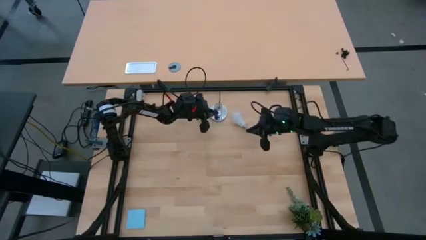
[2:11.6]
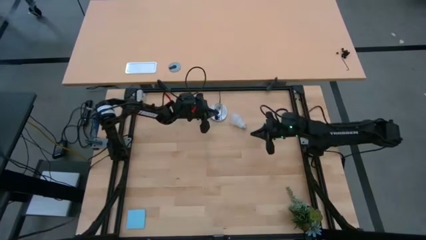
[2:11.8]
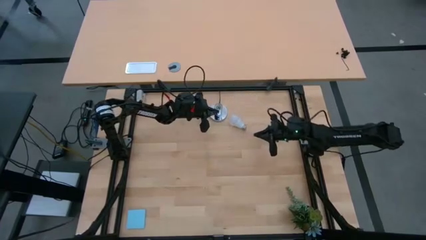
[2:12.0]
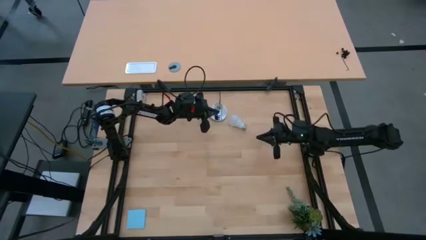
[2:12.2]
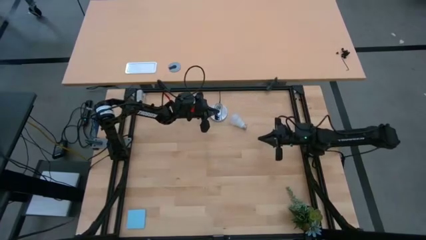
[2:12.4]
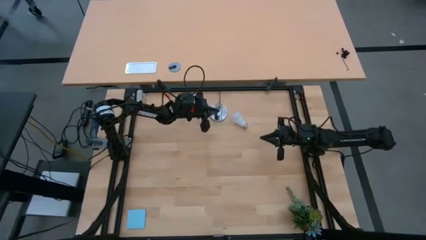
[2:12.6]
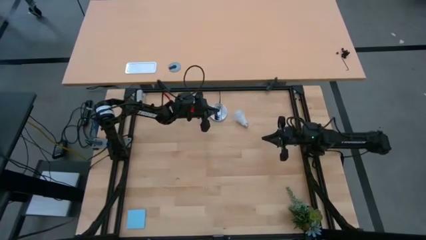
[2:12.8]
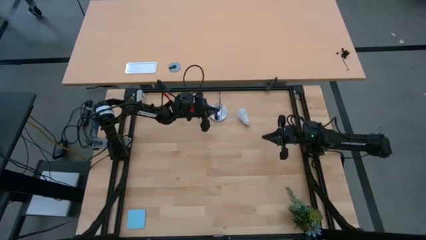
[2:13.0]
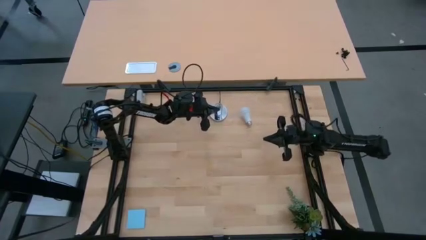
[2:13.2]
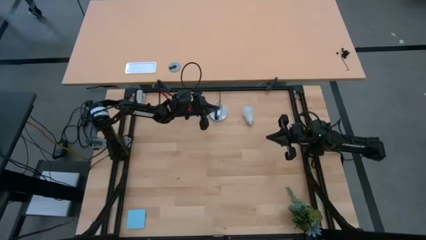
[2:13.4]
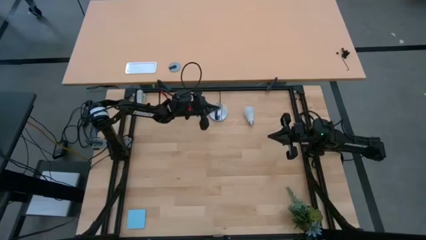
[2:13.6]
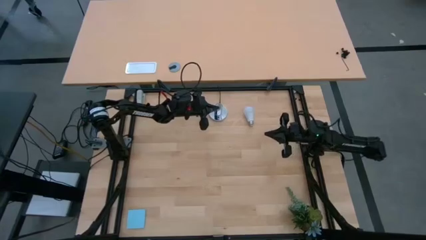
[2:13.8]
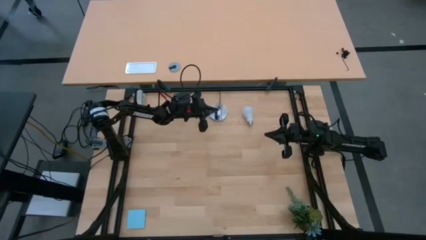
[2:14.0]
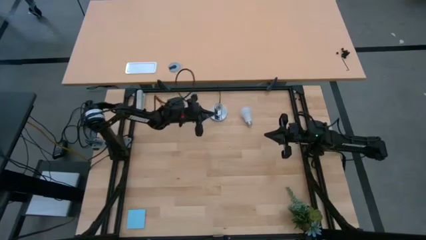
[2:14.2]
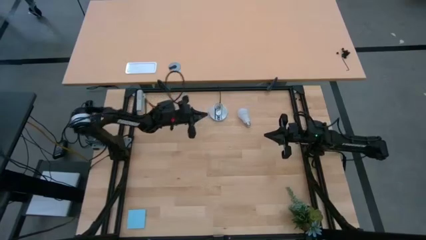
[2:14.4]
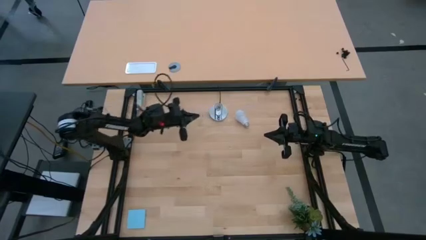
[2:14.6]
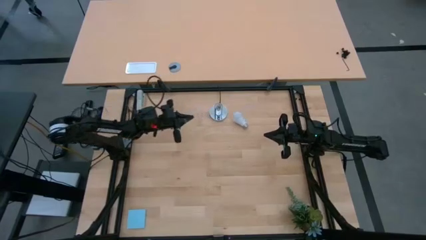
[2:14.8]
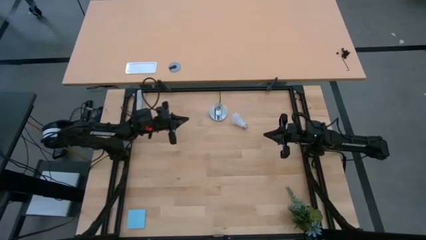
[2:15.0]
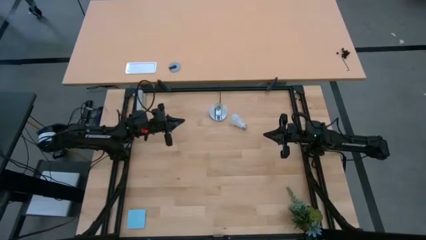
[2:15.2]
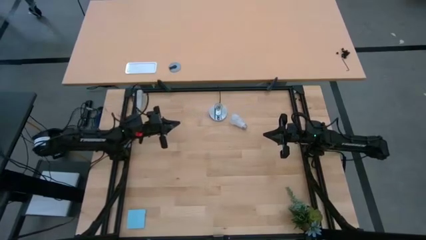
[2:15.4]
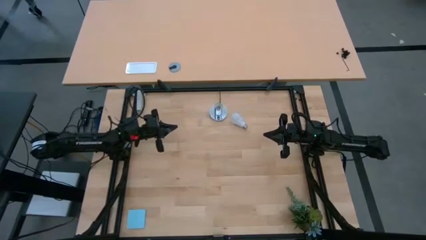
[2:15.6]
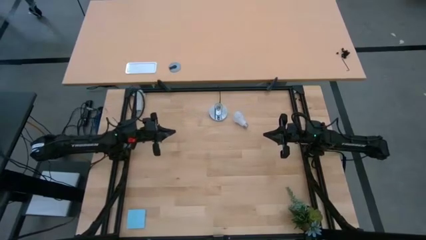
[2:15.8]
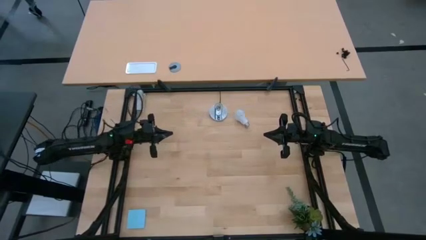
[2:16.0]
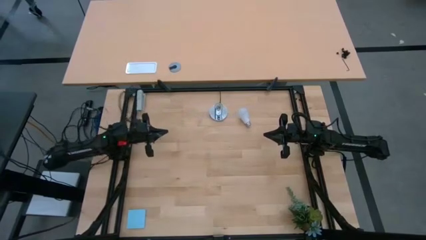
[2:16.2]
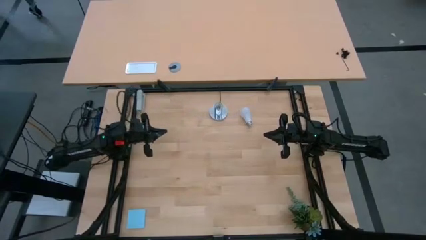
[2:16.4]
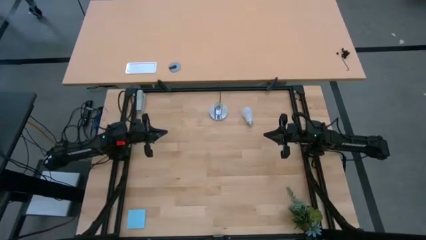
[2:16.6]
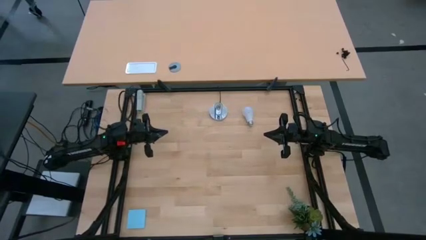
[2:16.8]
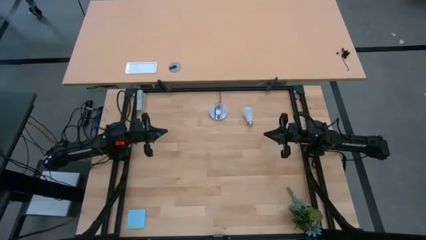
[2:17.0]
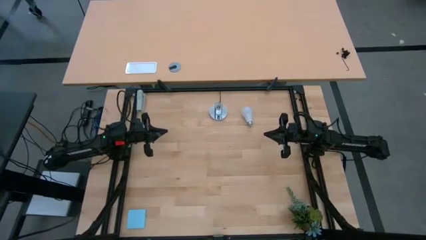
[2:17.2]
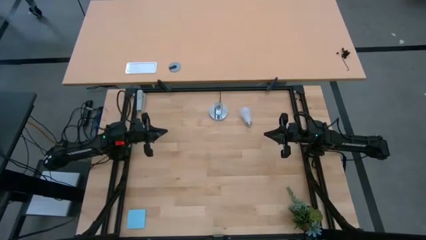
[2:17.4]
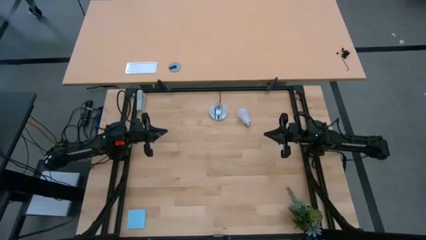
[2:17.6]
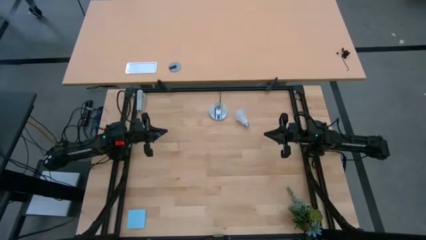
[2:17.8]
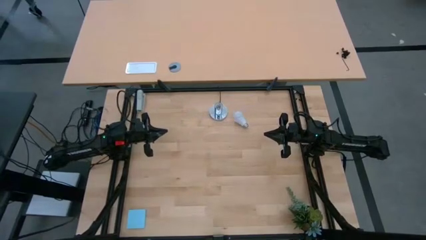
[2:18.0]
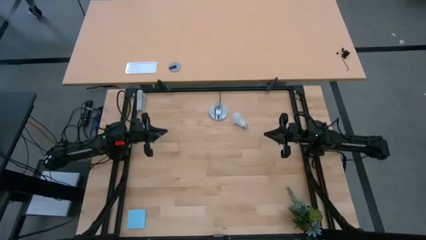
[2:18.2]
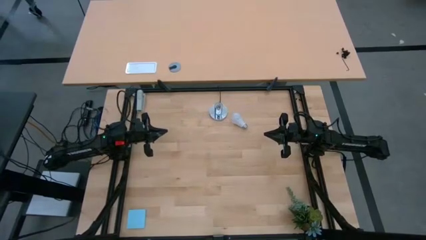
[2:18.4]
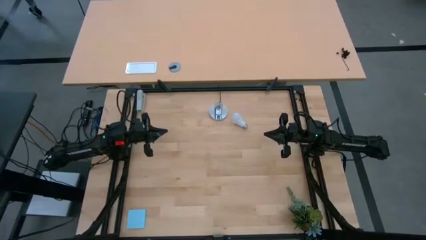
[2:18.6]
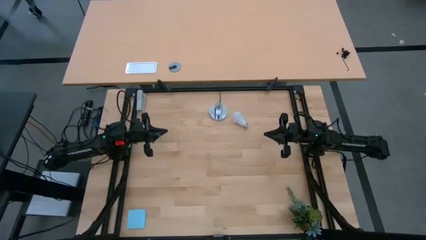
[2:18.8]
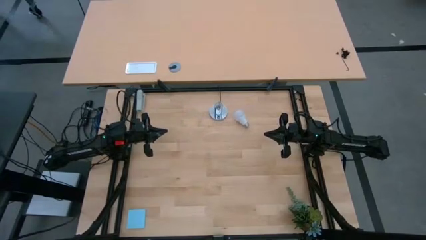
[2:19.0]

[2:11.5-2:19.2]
Task: Screw lightbulb
Return to Home Position

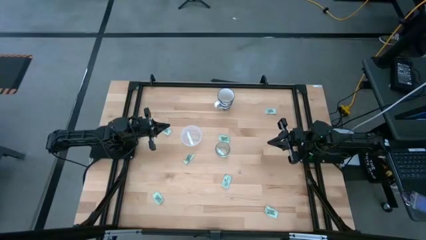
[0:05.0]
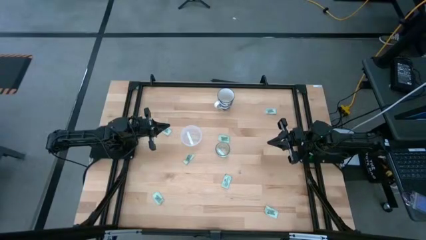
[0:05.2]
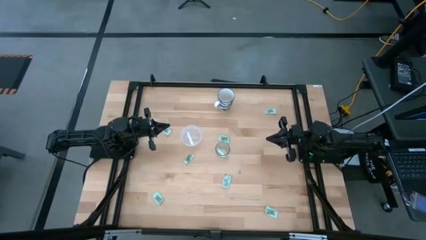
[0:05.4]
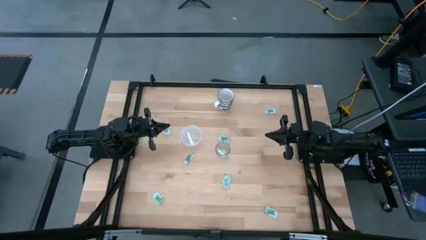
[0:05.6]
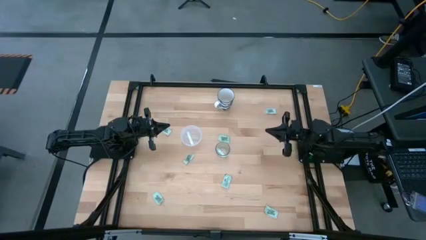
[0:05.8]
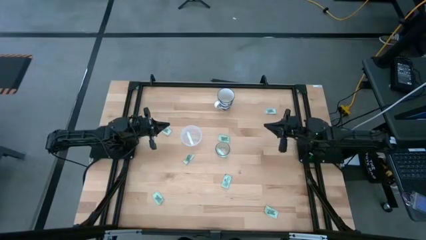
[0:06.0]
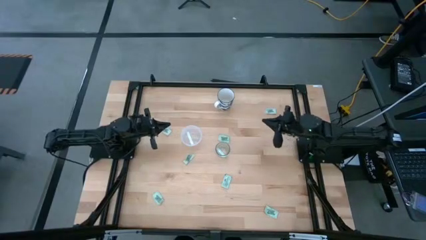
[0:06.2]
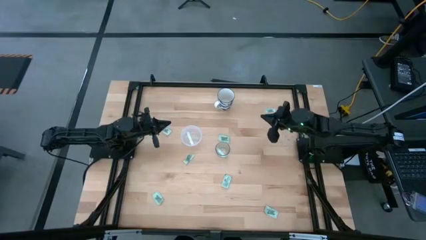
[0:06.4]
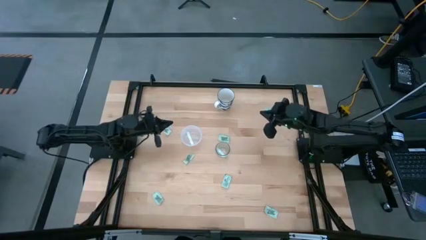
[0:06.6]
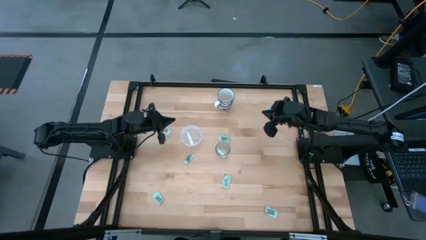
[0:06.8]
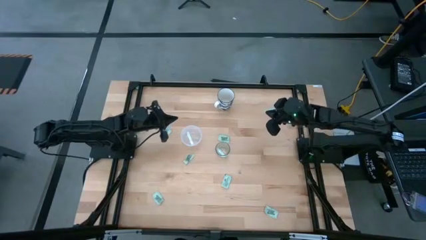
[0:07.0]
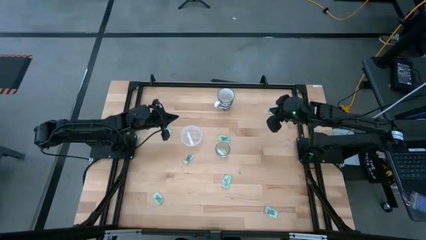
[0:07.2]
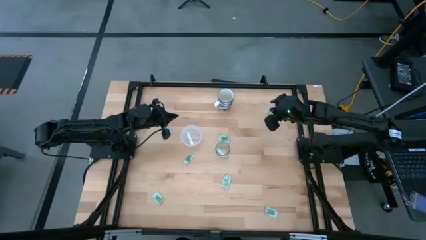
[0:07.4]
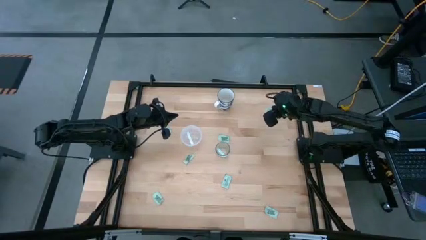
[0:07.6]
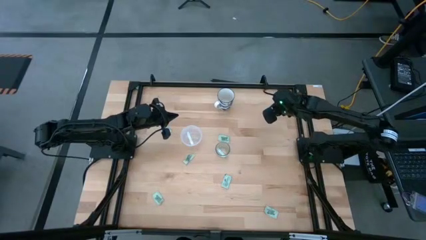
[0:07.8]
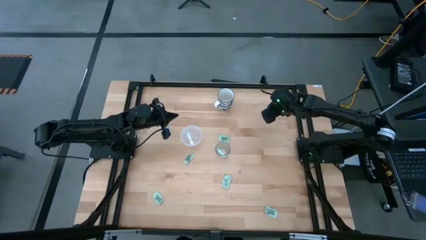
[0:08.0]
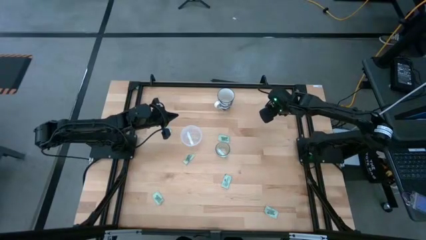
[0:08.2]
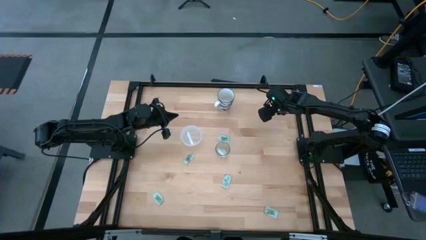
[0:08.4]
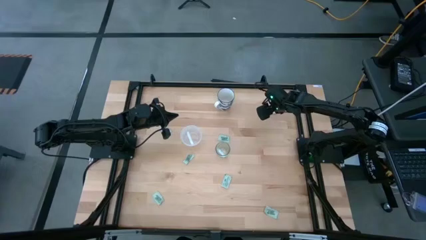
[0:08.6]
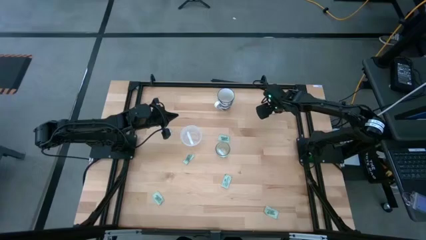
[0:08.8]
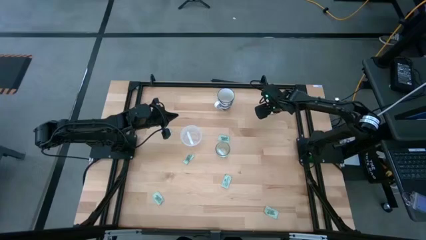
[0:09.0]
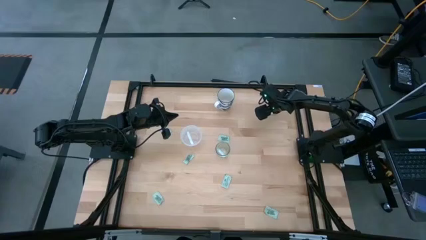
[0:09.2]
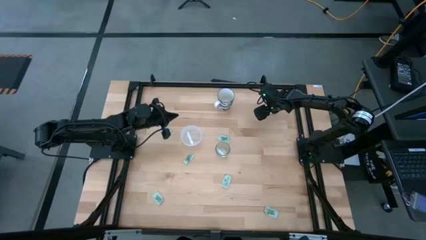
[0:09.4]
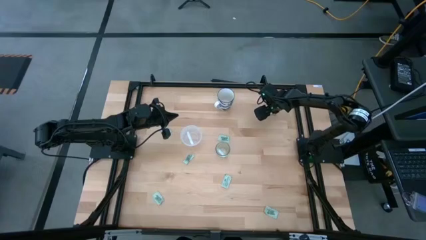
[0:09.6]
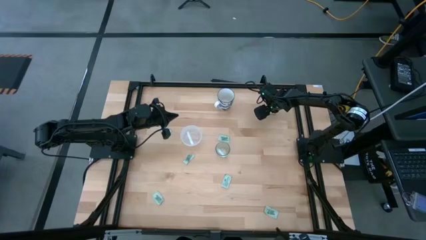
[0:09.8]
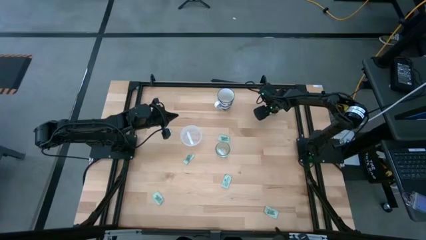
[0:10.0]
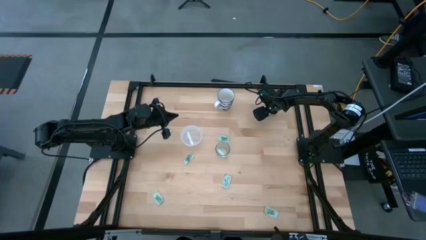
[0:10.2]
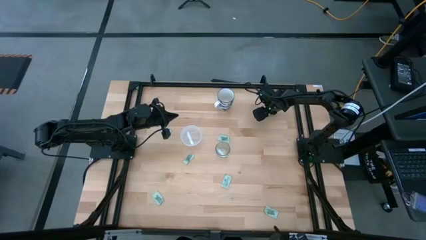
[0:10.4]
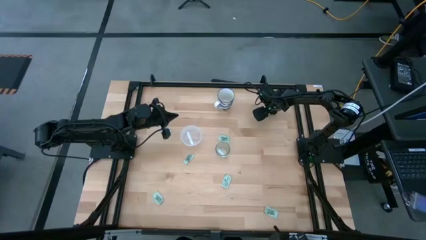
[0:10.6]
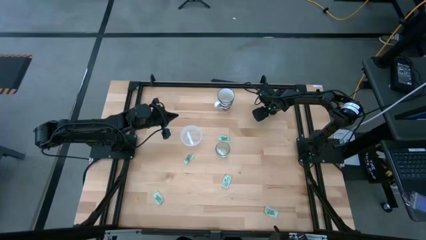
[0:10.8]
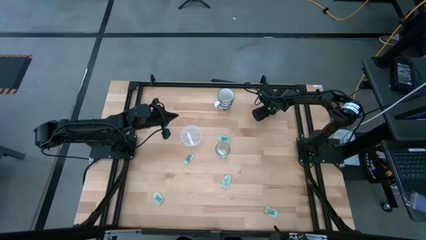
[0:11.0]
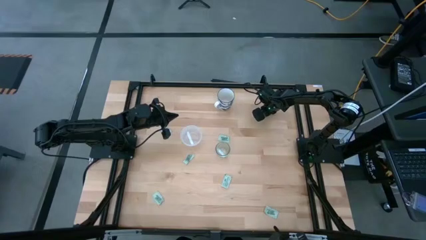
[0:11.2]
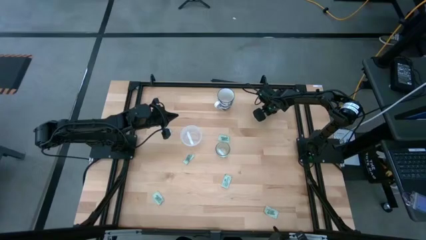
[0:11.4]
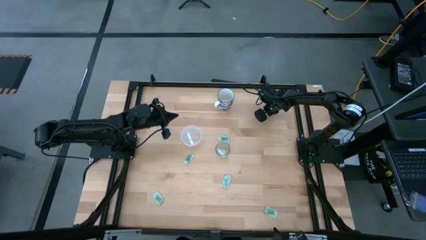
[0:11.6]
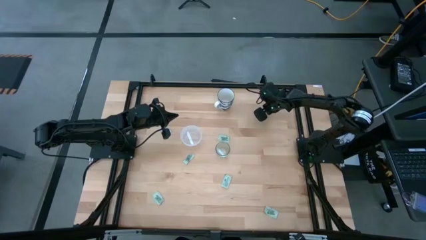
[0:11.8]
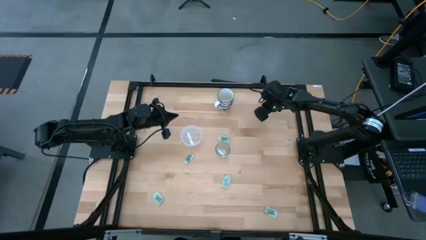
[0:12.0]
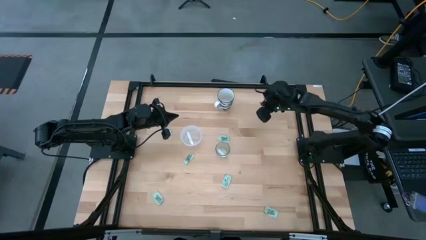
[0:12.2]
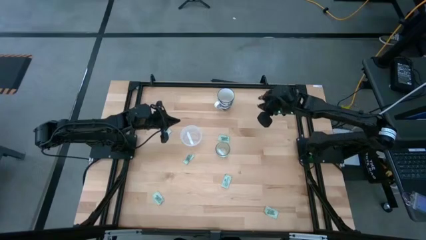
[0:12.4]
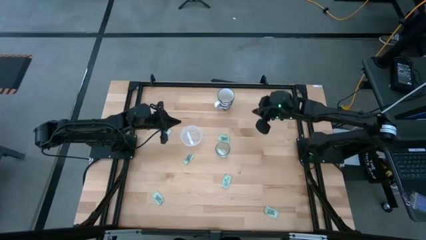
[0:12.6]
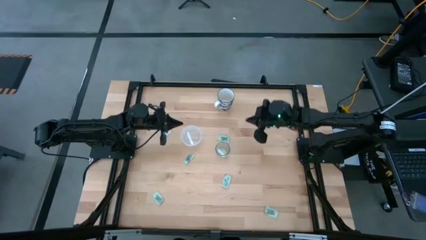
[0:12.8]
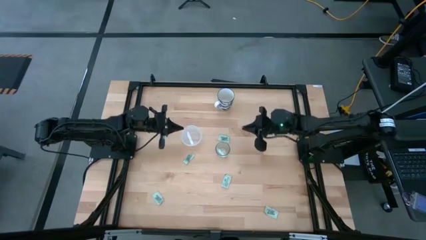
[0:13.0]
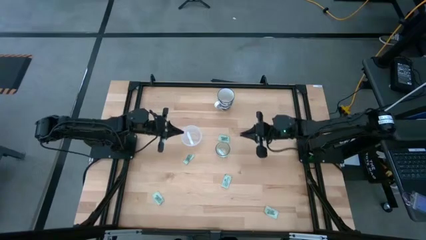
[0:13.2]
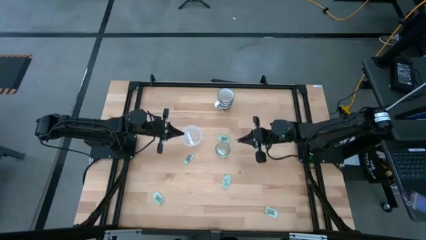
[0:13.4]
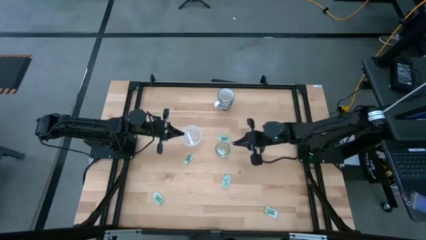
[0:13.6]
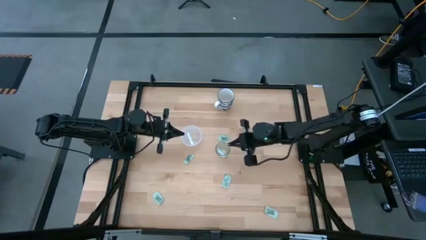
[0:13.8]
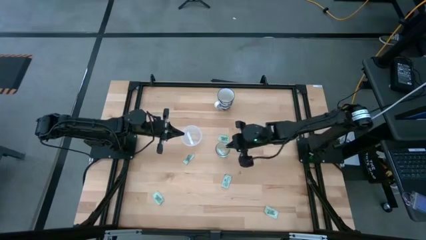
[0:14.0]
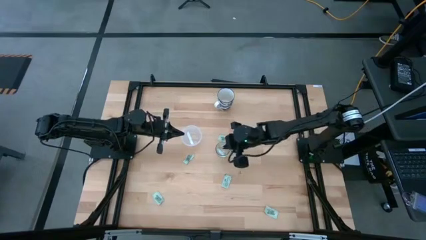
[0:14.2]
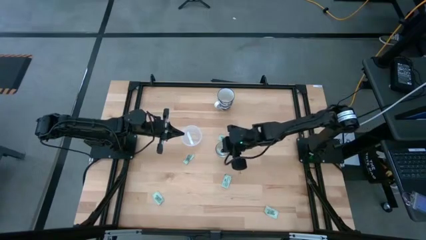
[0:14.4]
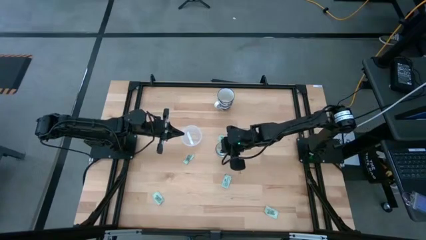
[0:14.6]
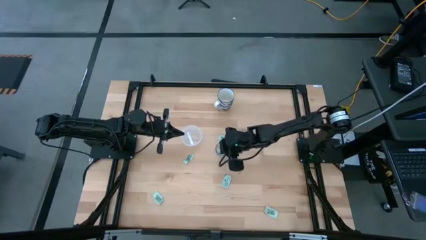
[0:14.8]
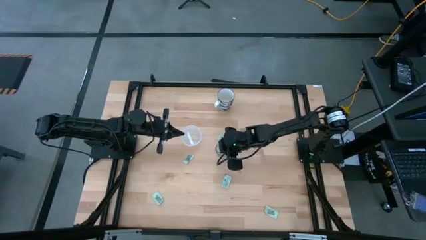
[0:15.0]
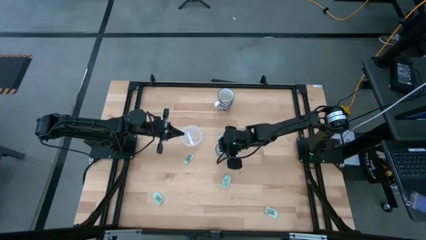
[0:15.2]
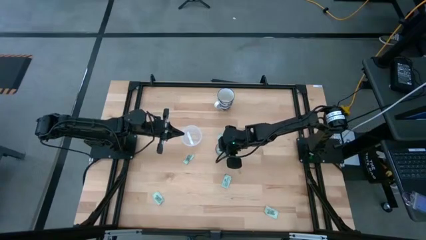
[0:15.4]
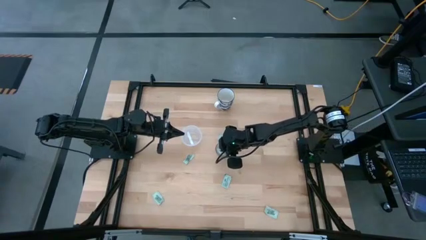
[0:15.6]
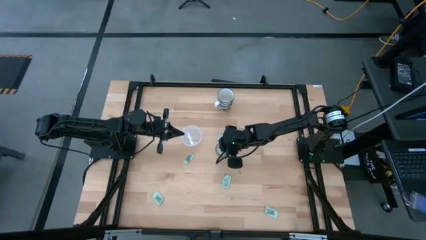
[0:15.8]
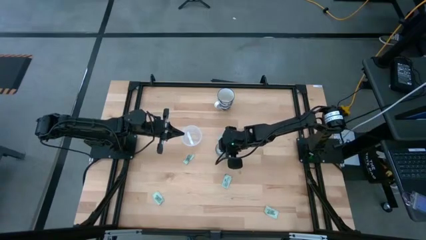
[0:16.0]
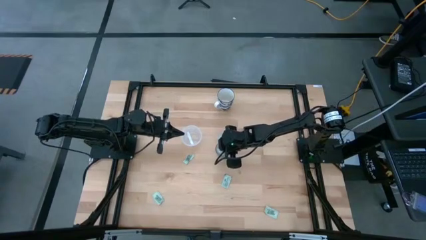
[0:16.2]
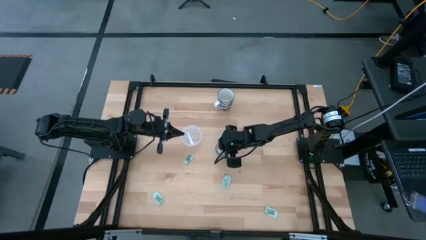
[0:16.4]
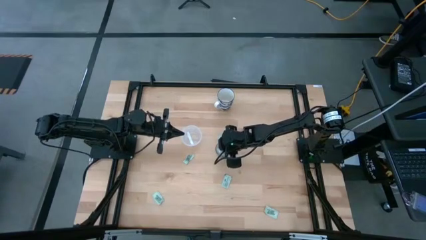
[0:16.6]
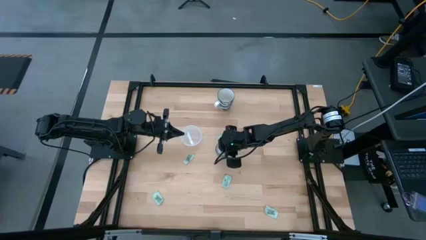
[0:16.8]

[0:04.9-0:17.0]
Task: Pick and place Stevia / Truvia into bins
Put the stevia packet into the transparent container
